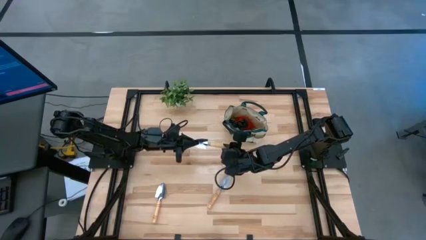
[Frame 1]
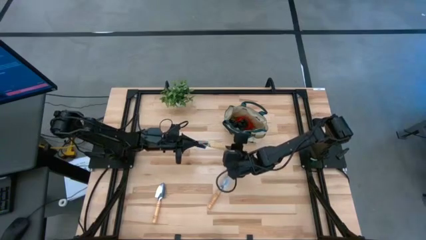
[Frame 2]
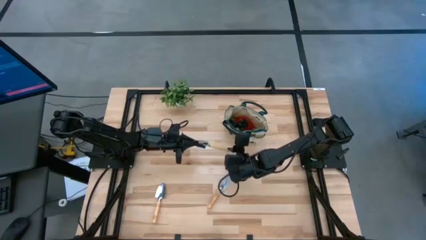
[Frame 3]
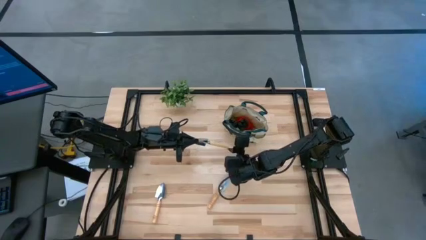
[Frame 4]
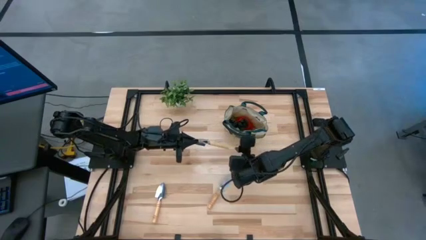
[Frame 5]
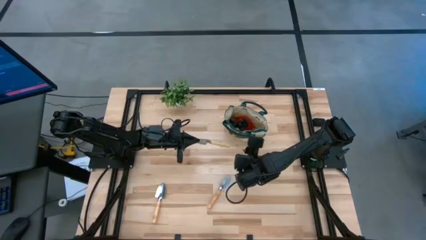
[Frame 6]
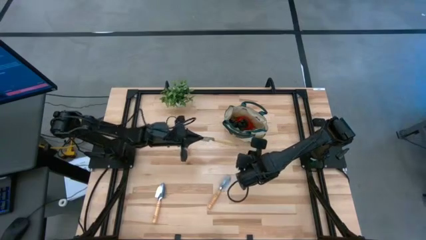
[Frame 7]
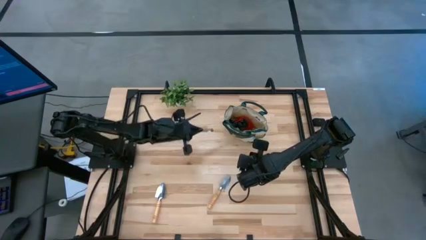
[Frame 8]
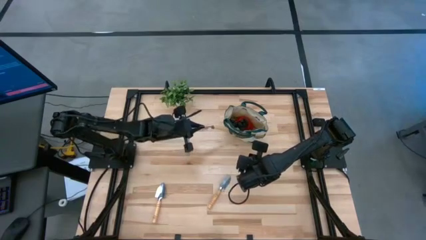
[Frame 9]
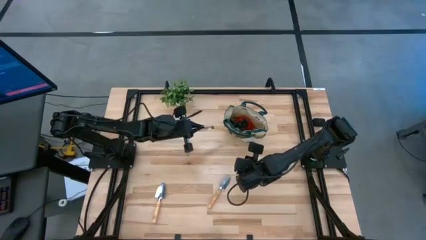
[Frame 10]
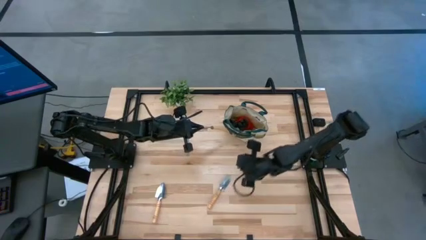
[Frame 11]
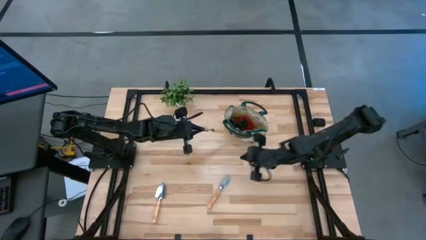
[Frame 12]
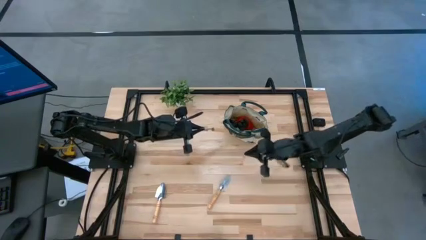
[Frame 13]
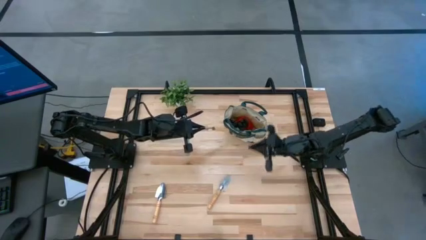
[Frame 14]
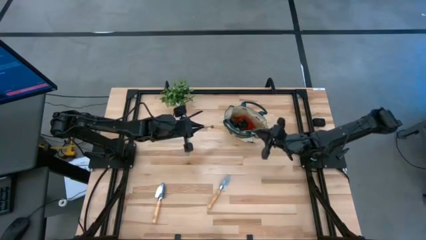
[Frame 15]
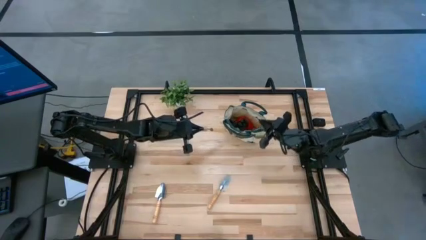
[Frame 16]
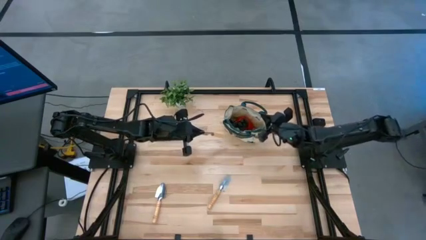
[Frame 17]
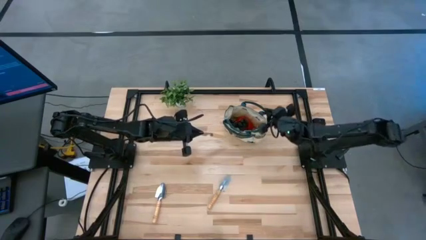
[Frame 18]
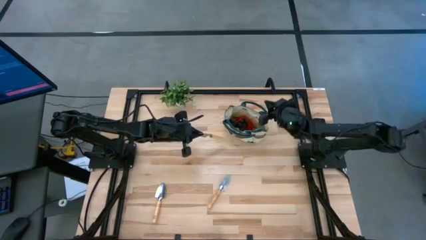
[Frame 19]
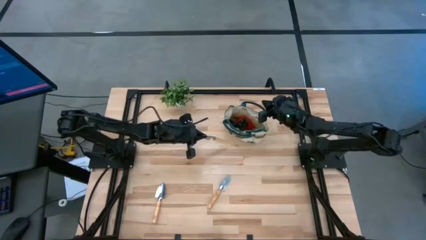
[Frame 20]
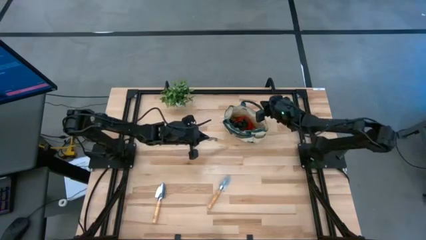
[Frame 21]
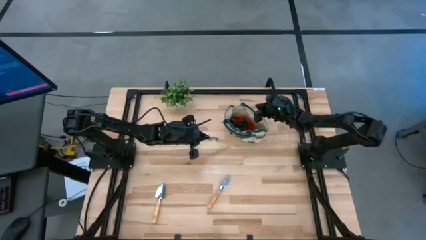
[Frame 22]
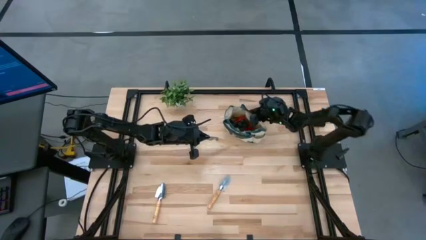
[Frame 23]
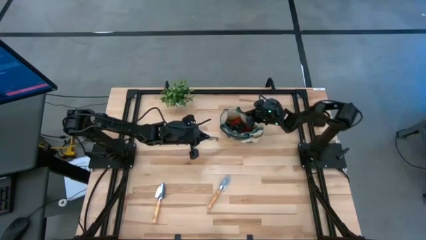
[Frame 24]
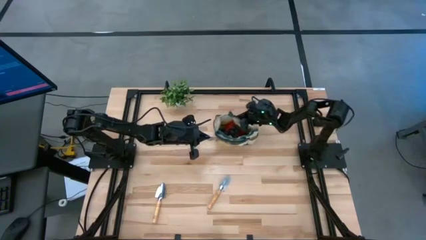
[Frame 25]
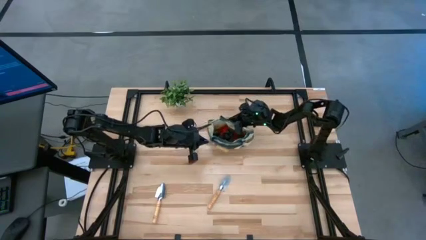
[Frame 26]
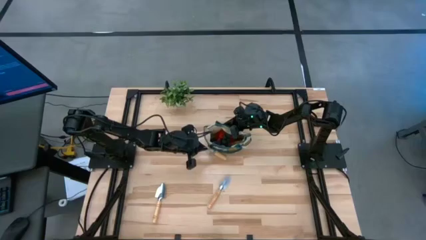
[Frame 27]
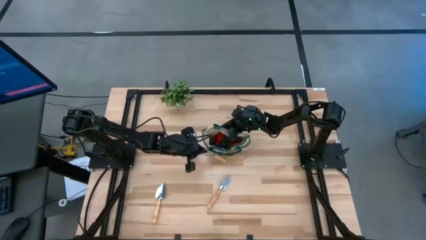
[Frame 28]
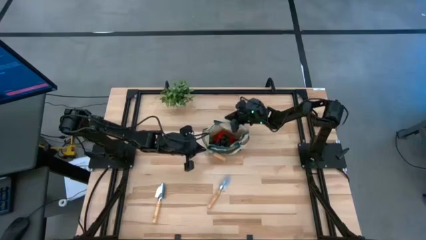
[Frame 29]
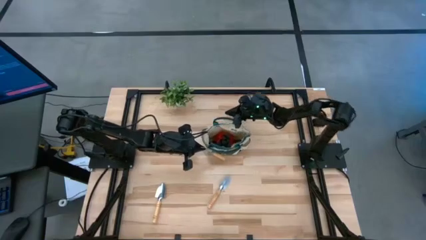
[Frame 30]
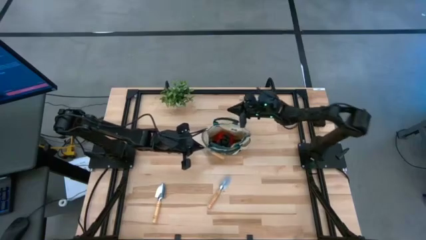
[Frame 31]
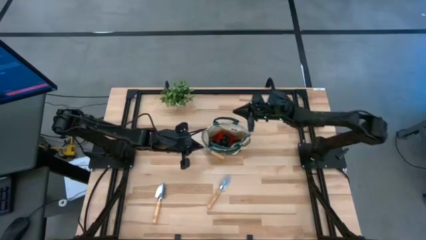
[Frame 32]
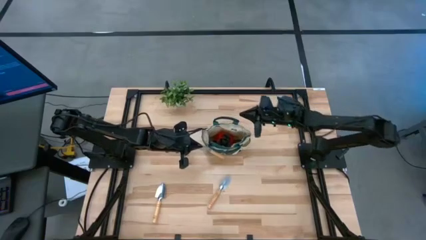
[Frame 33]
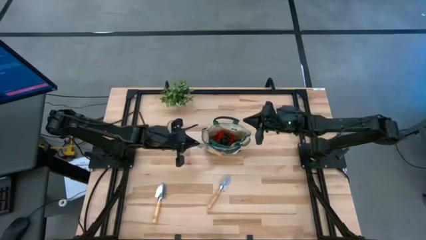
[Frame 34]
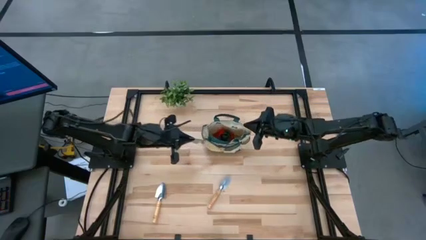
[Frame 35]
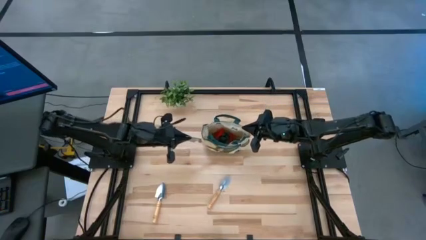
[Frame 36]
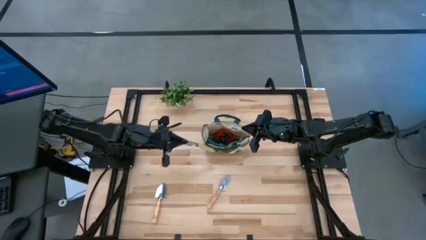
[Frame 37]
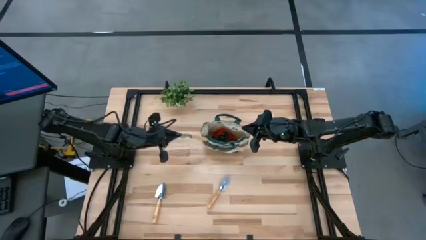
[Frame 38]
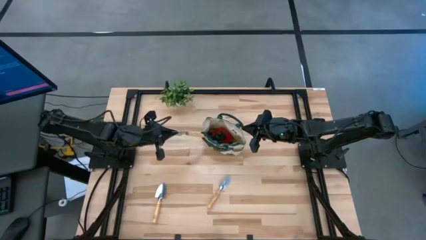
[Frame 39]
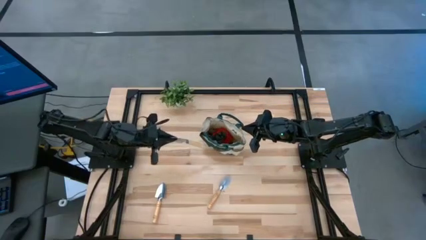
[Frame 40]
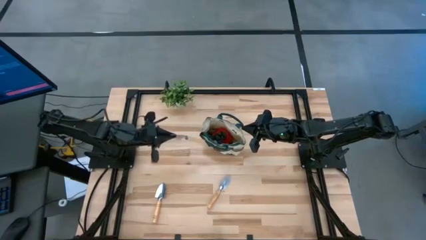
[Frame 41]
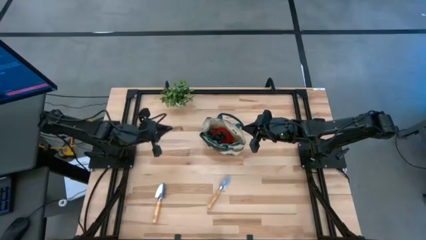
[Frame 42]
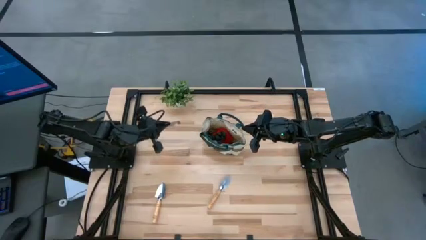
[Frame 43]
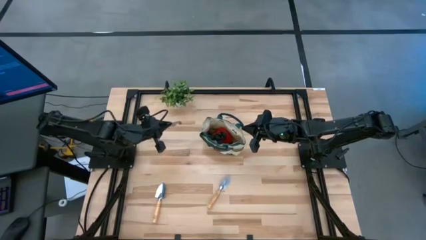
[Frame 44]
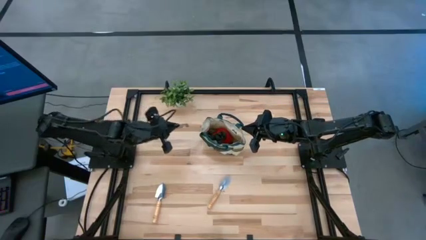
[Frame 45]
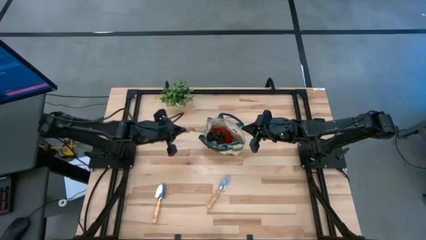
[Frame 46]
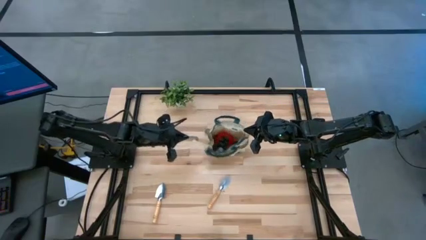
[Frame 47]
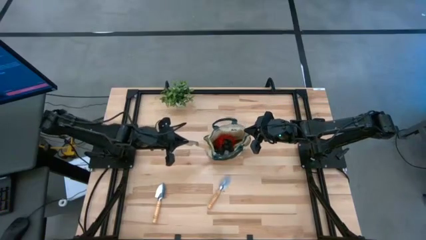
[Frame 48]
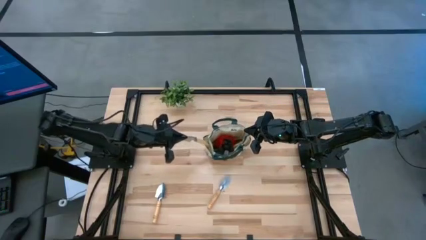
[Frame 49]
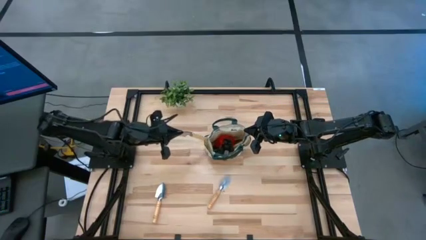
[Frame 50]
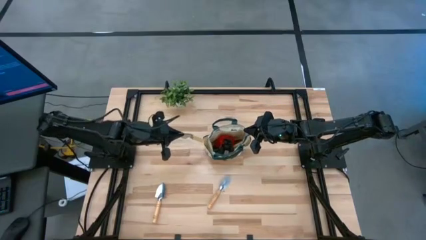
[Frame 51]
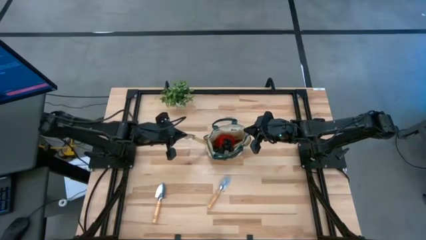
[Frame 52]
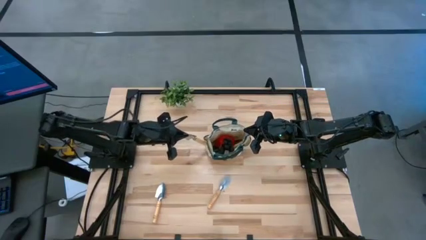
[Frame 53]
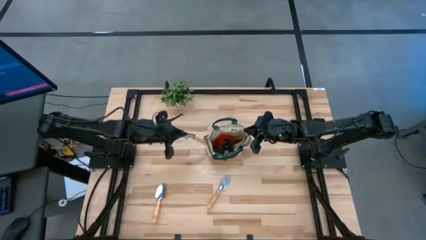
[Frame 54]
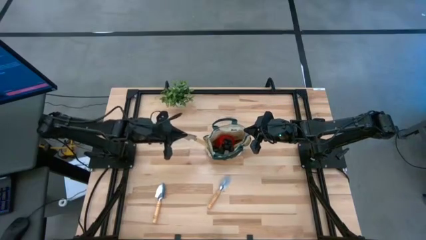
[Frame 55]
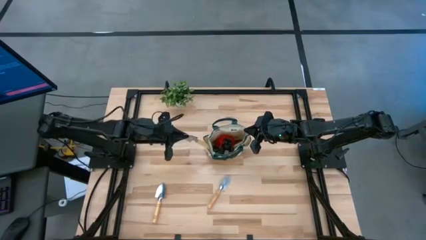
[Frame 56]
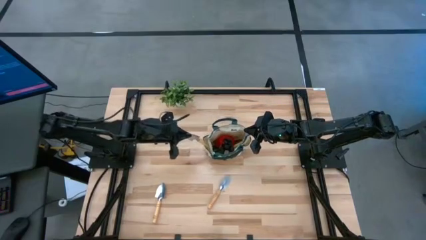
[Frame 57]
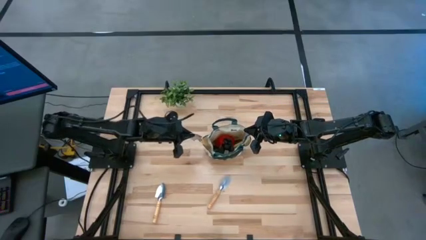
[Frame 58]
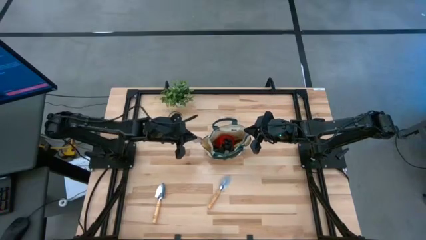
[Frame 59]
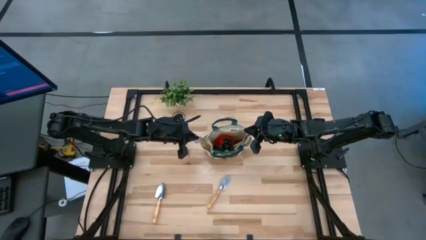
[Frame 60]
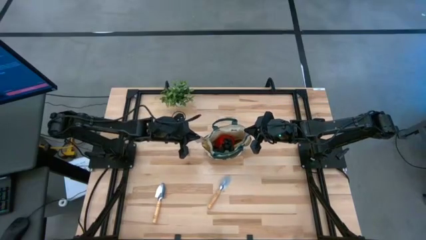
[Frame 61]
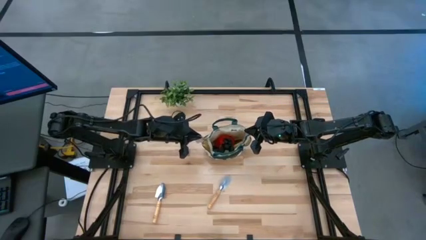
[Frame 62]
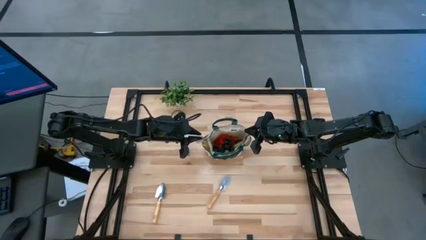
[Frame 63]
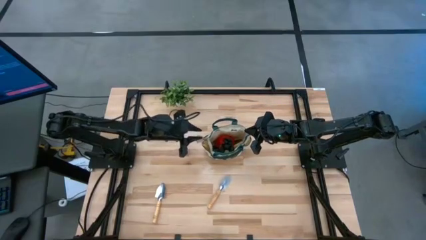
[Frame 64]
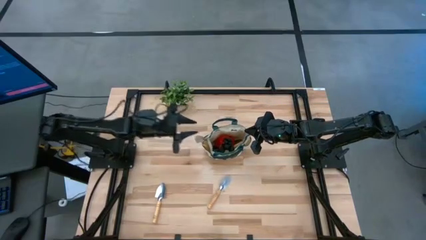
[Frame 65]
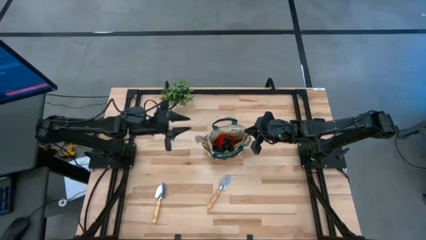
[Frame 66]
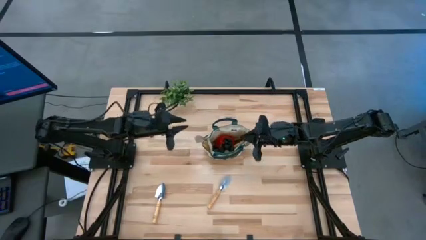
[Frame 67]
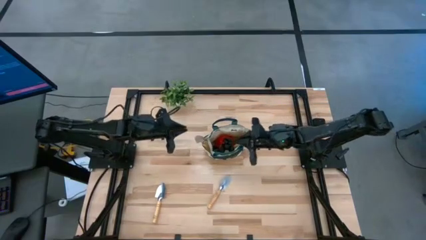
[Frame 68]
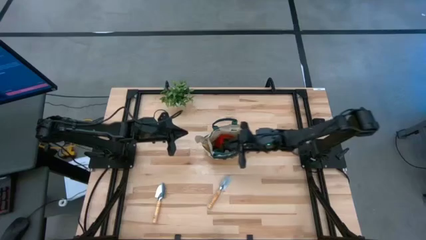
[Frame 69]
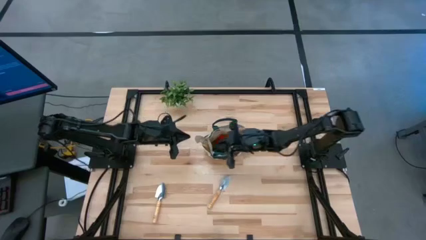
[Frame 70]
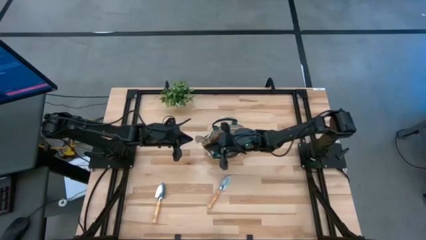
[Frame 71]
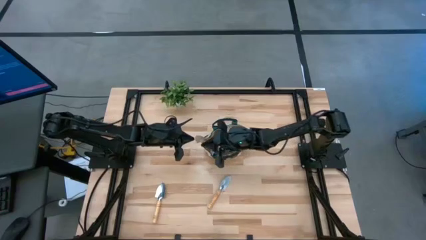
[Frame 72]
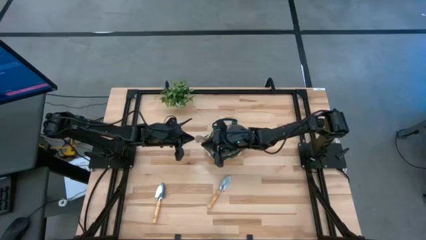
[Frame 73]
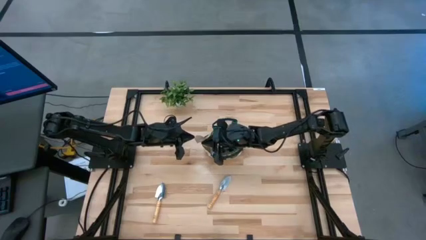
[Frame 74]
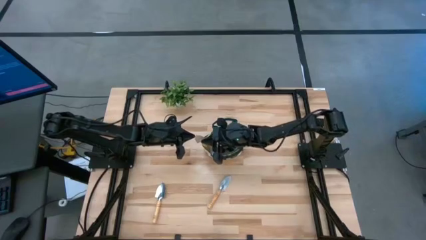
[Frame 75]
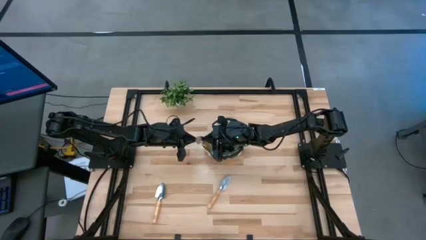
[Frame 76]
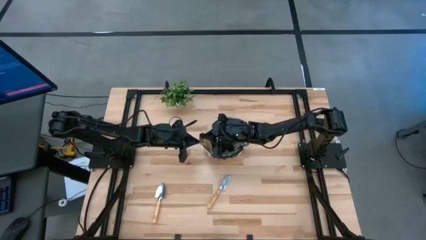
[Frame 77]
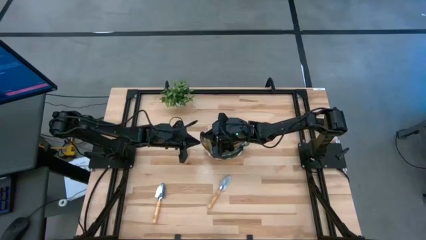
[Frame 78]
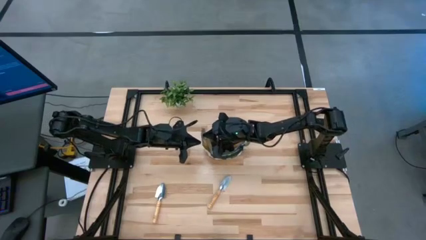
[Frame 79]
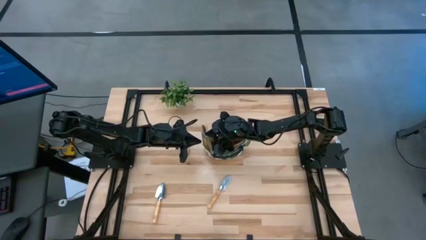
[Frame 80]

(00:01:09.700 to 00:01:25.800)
Task: Pick & Place Garden tools in Gardening bag
Put the trowel into the gardening bag
